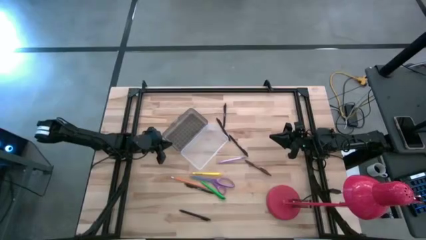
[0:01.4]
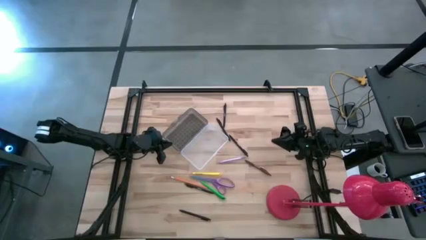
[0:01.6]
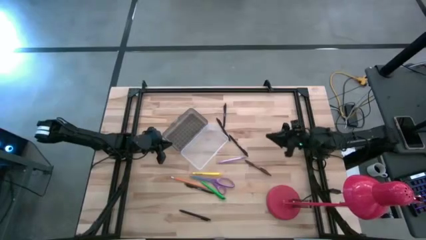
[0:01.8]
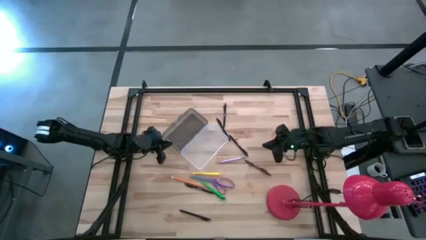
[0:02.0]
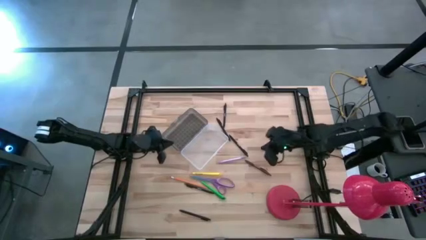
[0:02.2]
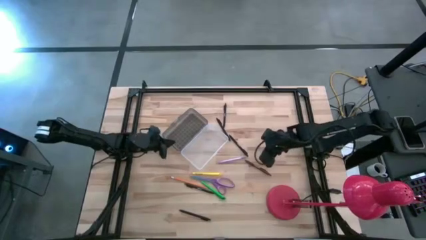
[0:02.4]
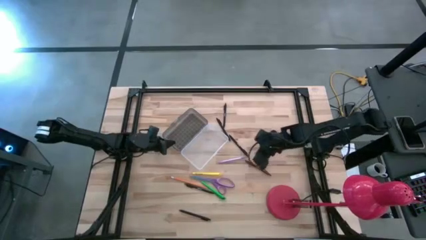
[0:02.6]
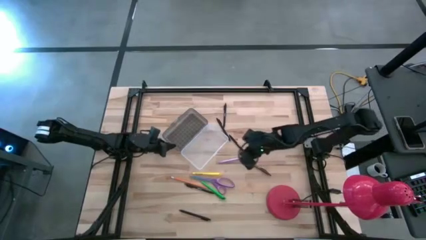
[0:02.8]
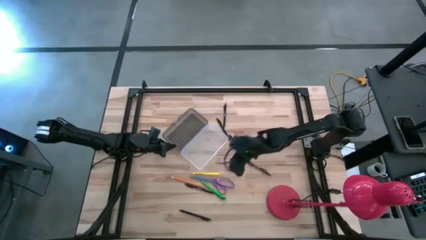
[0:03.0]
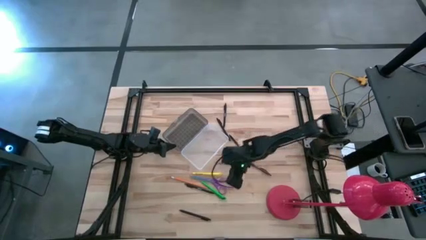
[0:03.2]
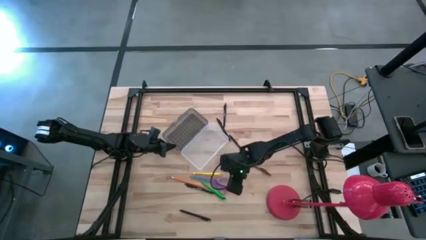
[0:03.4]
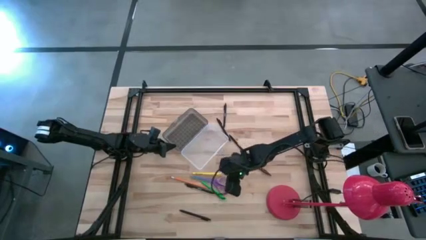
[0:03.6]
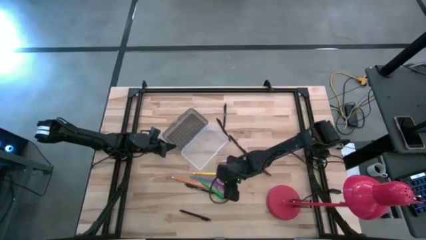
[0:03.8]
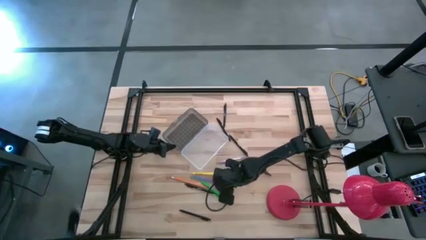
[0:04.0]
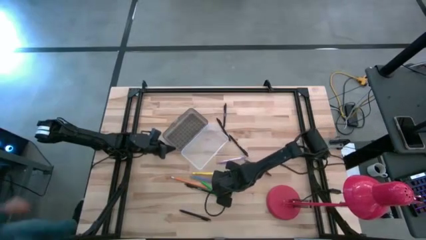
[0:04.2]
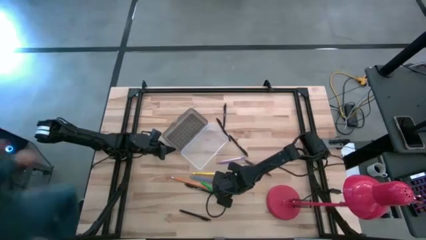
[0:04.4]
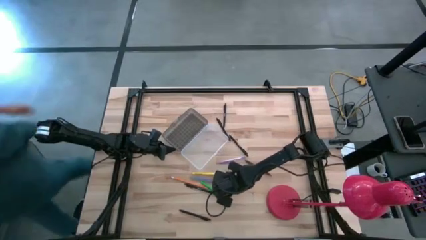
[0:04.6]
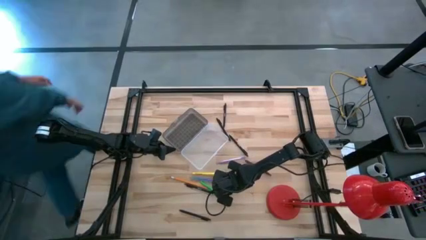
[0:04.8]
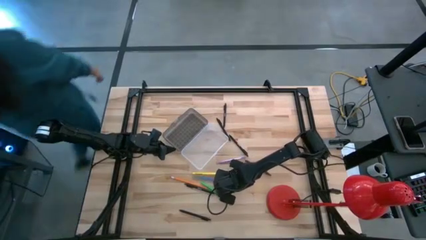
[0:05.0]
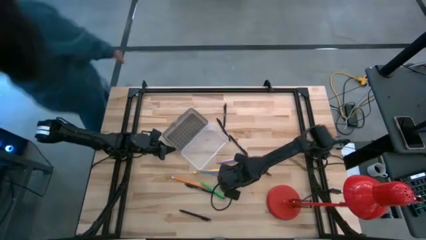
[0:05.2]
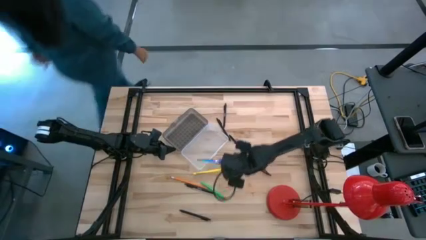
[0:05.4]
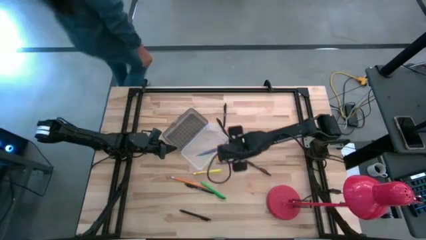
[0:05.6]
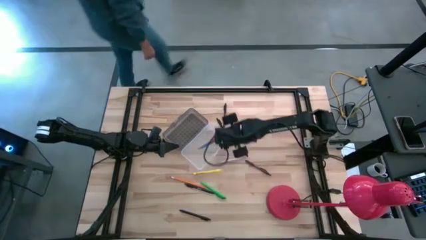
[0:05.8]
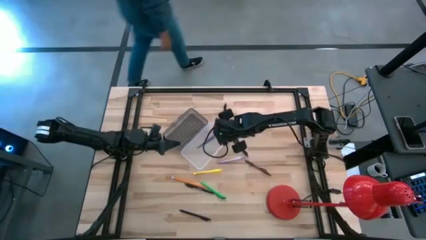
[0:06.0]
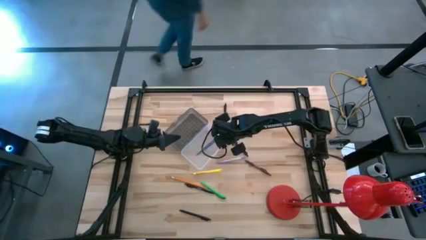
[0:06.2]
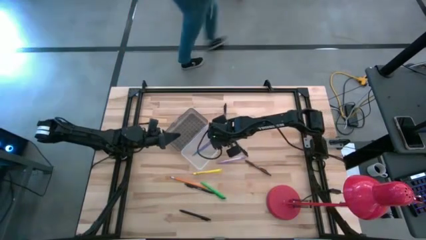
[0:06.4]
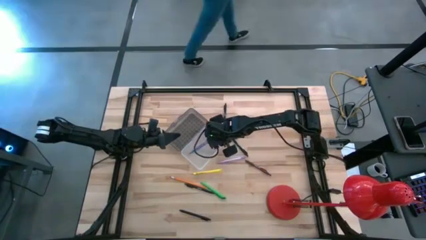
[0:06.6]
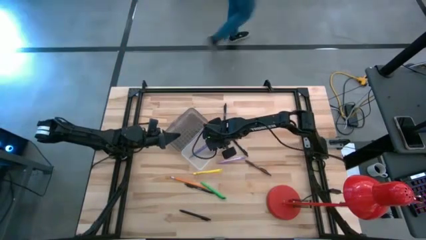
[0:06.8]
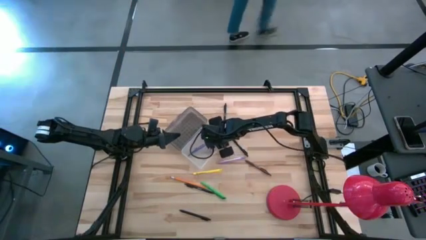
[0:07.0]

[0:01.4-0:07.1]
Task: Pick & place school supplies into a supply box
Put the violet scissors into the transparent supply box

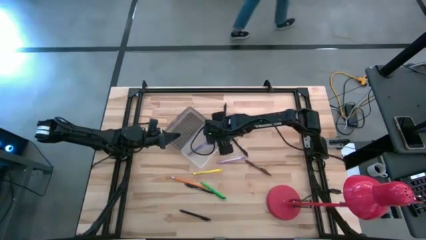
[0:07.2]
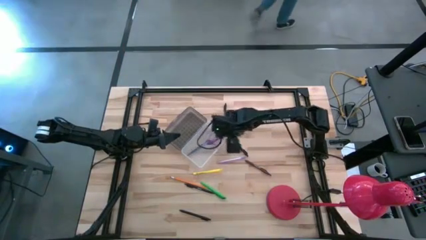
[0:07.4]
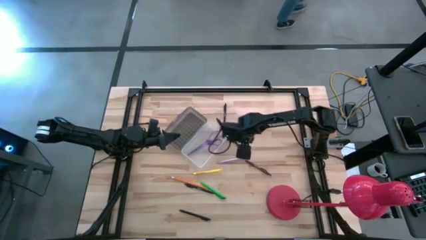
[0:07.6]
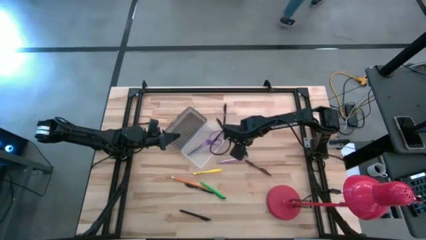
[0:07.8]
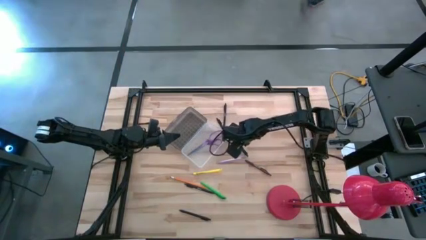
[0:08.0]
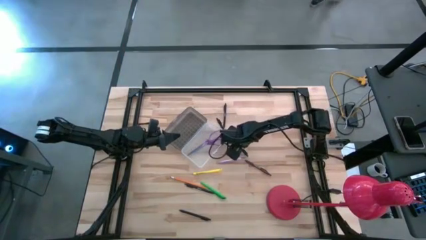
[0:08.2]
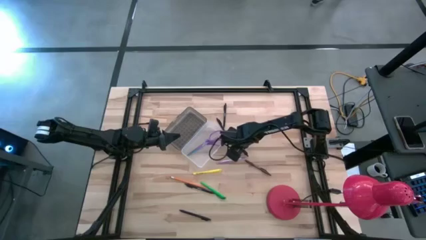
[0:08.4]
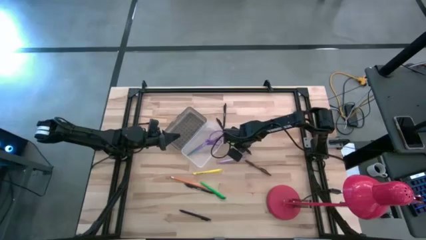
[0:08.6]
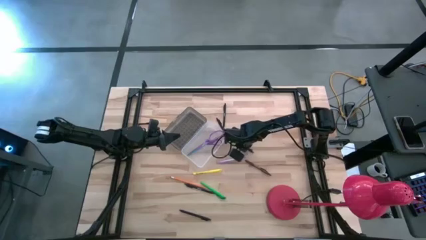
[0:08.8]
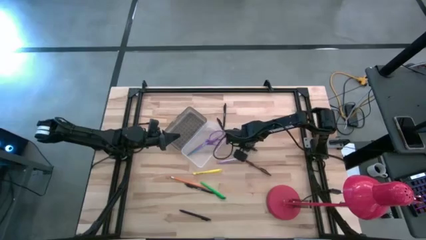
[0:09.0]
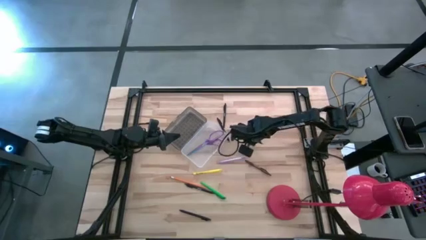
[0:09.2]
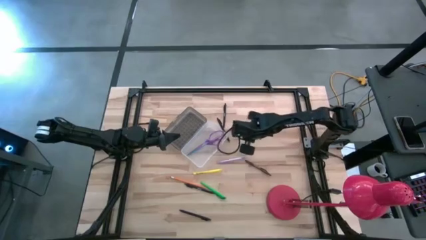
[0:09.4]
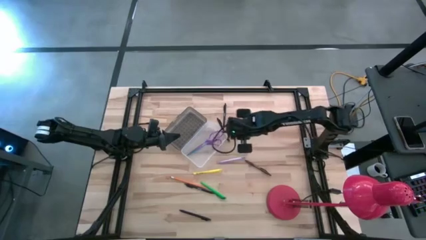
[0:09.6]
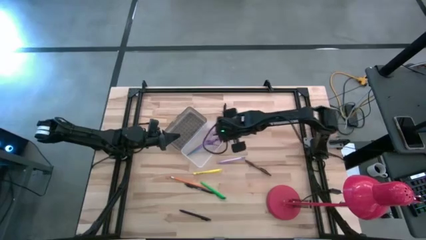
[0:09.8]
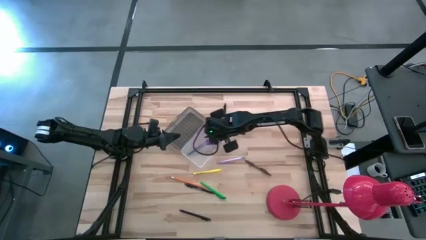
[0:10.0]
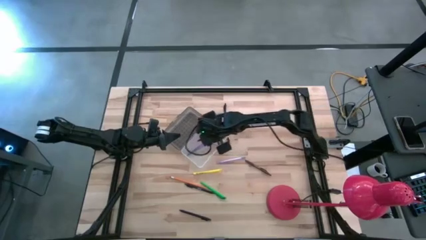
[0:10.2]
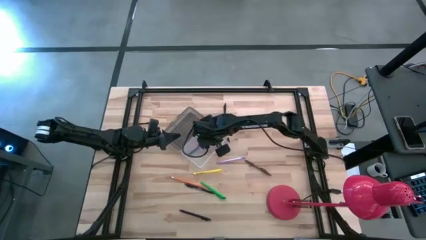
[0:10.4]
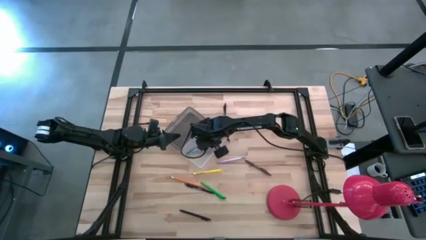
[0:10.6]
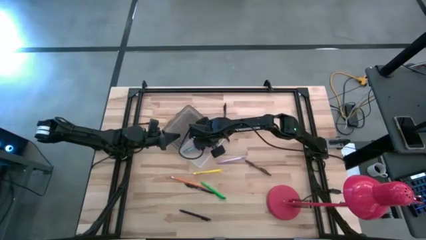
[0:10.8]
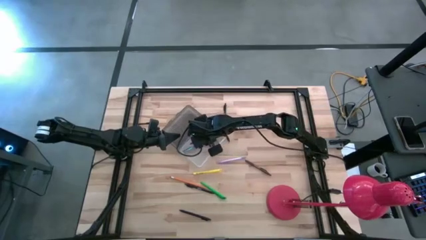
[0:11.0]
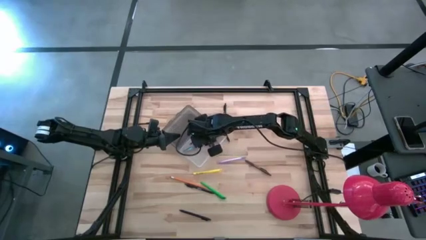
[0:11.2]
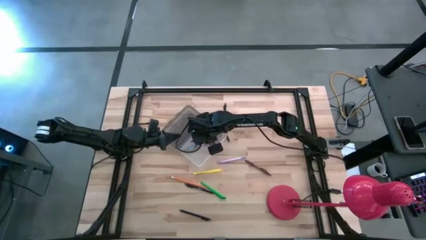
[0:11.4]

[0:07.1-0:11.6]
Put the black pen into the transparent supply box

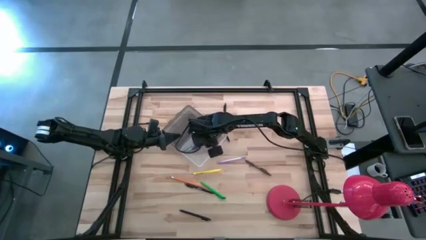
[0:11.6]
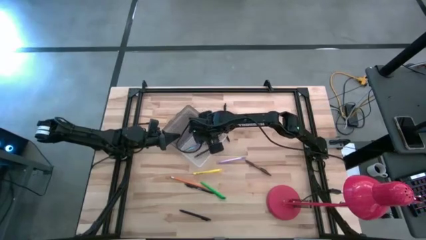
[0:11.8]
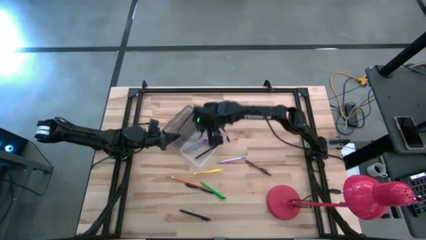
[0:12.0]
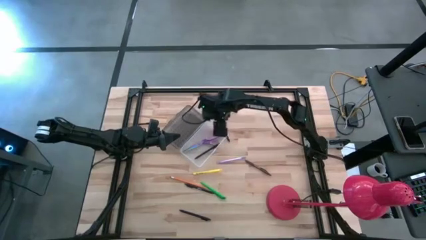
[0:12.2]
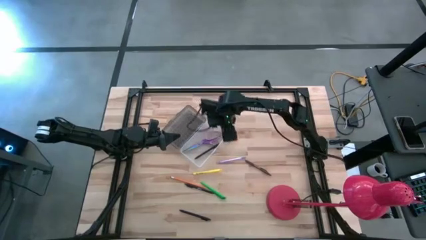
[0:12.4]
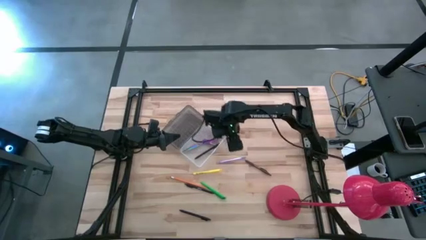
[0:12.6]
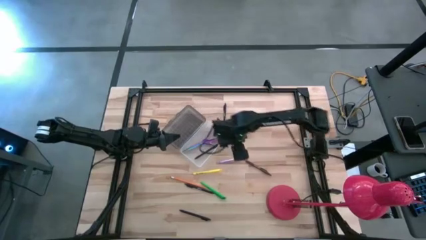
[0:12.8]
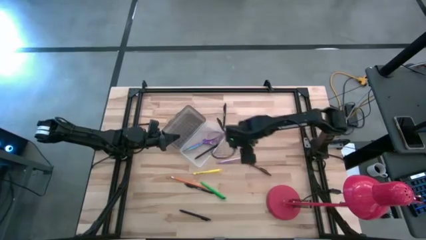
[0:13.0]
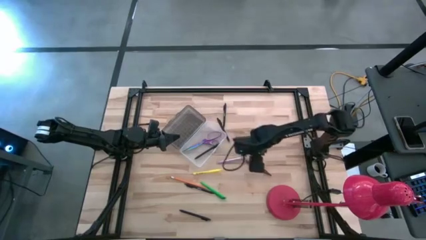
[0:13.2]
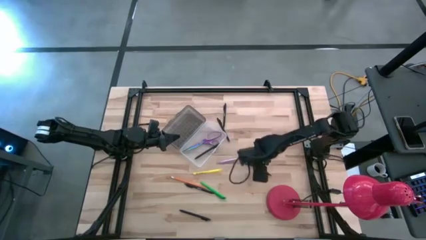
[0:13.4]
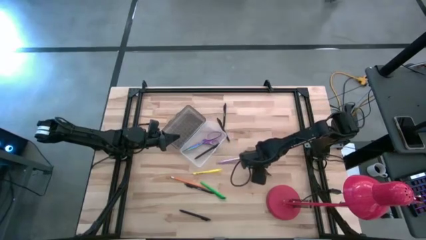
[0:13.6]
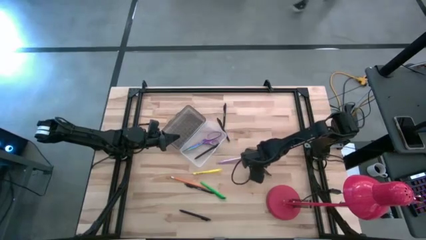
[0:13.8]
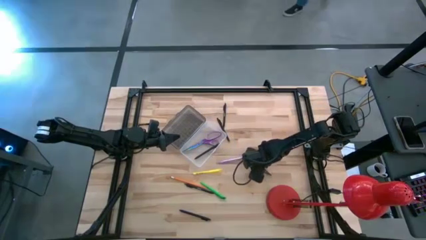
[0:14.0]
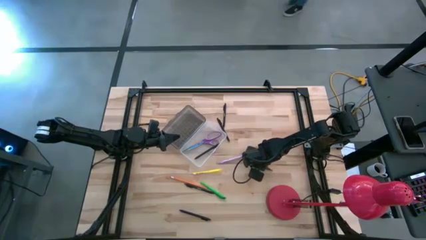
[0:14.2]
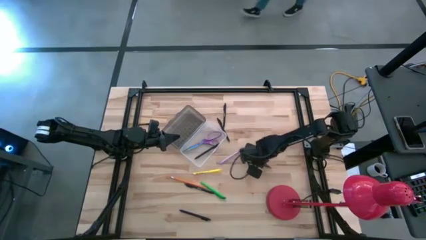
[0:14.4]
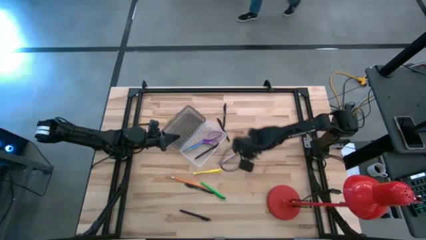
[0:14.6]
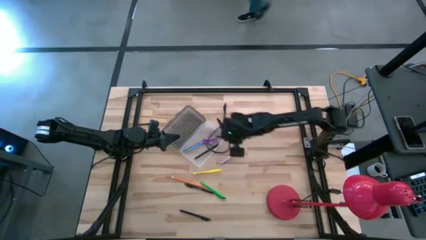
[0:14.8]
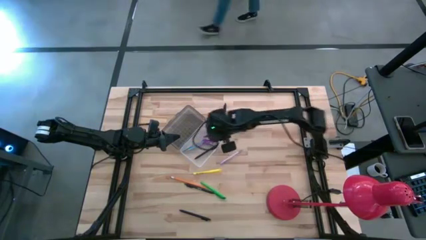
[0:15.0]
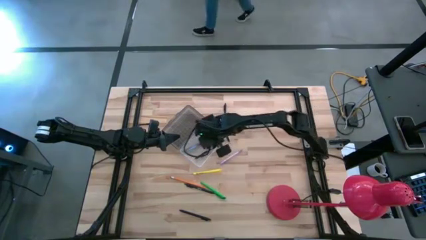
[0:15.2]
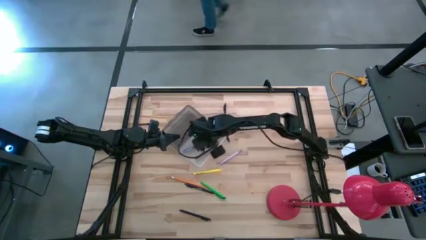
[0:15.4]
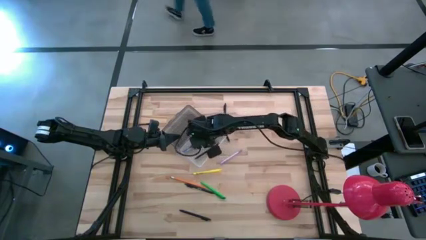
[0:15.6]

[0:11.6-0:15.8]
Put the brown pen into the transparent supply box

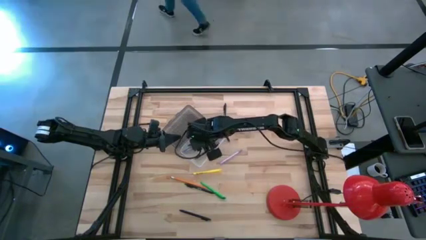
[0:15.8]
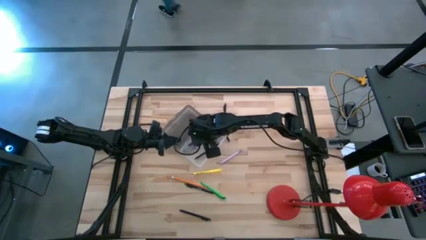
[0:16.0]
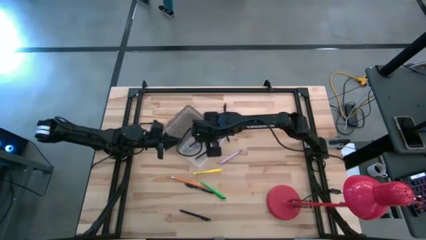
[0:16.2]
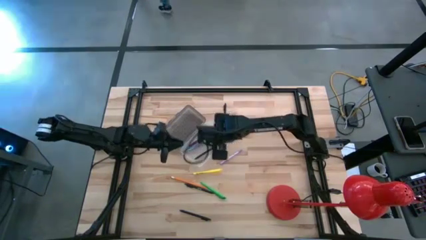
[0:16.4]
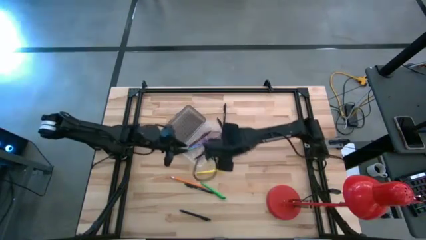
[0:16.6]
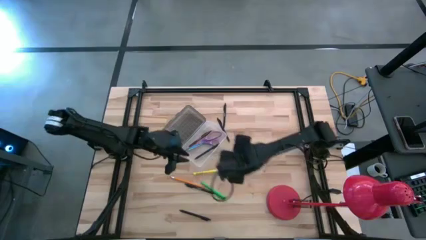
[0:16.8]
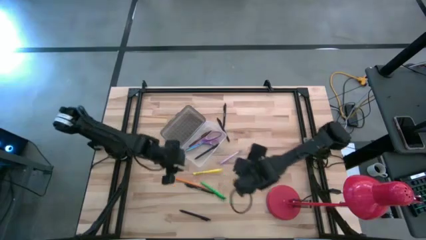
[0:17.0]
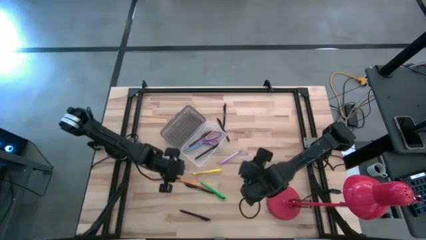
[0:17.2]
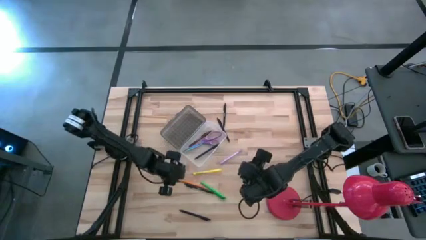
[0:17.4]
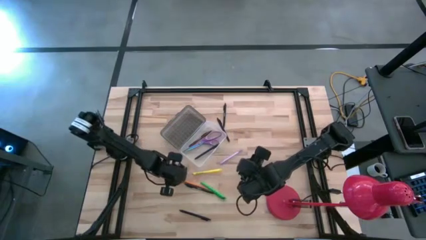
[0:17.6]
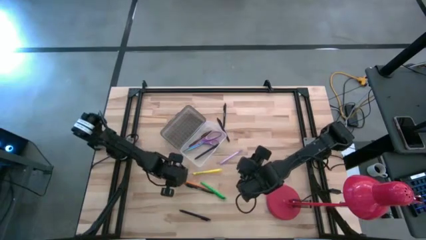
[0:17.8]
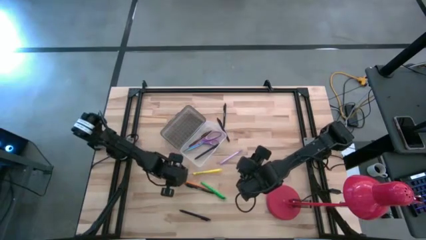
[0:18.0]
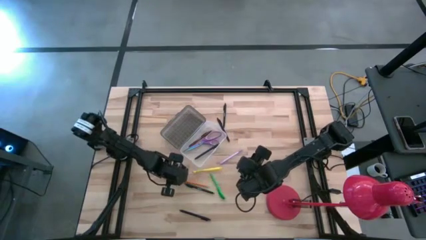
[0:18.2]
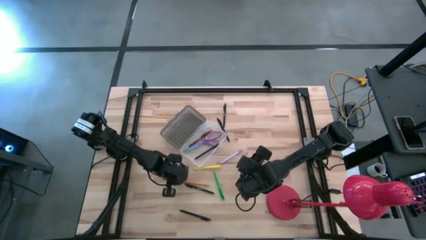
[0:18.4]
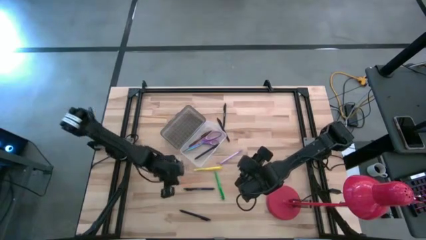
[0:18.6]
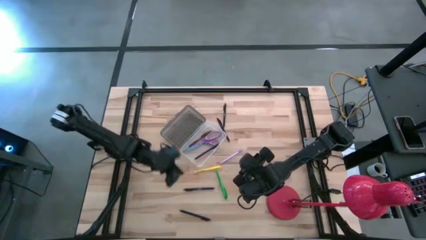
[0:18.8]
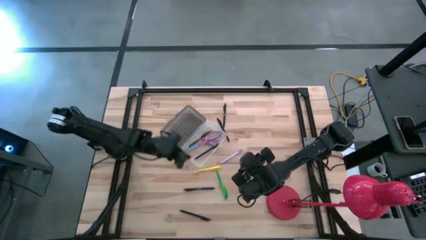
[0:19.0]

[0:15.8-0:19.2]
Put the orange pencil into the transparent supply box
